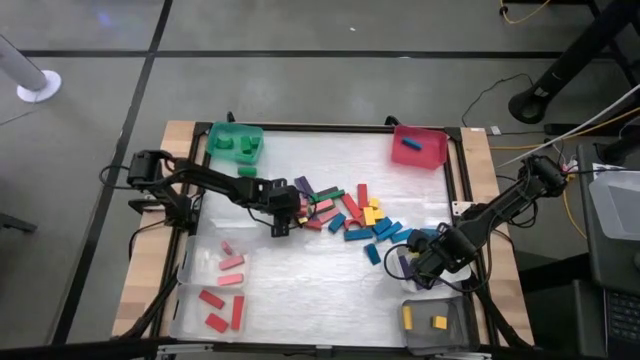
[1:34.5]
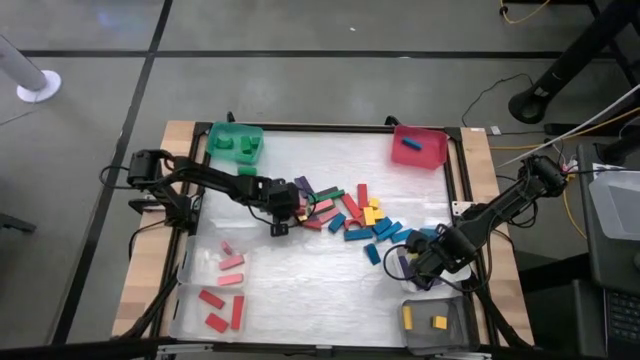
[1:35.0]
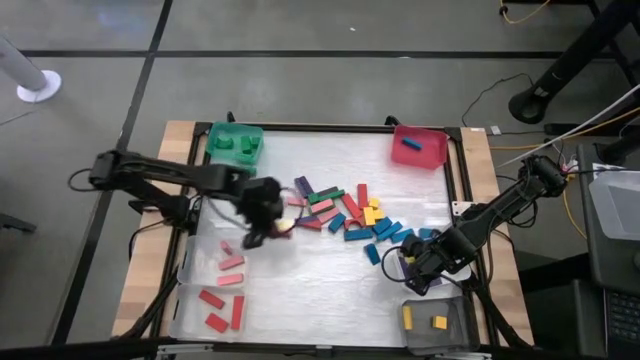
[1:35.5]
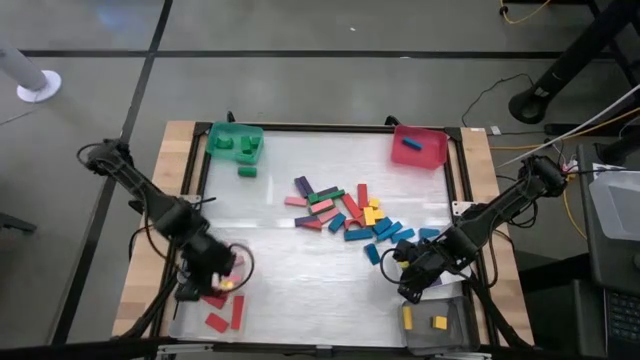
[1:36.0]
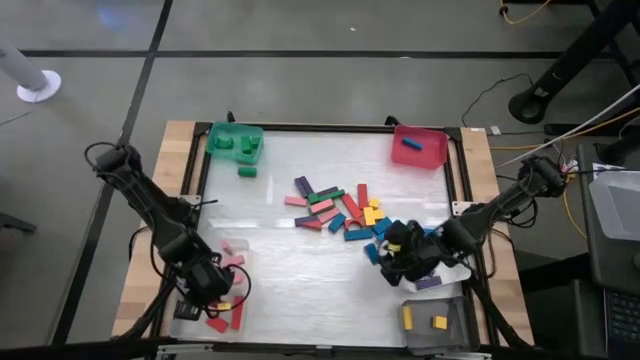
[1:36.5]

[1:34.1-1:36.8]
Task: Sort blocks
Put the red block into the bottom transparent bin

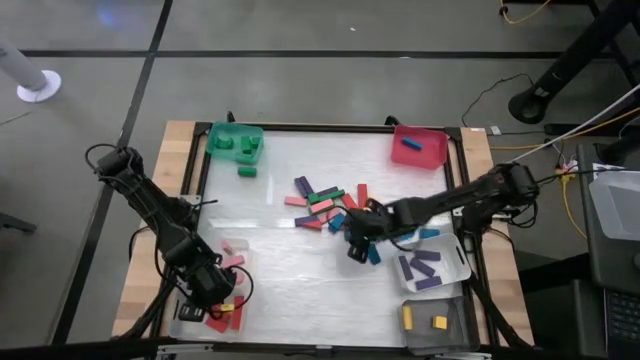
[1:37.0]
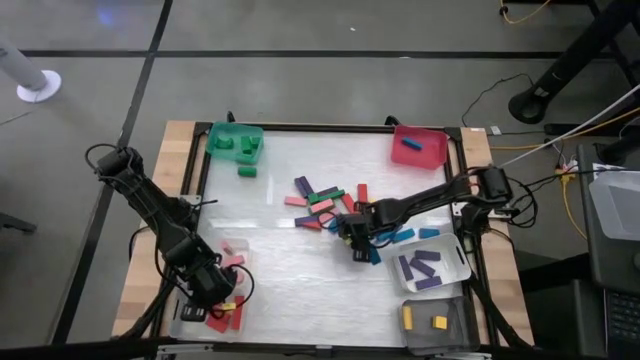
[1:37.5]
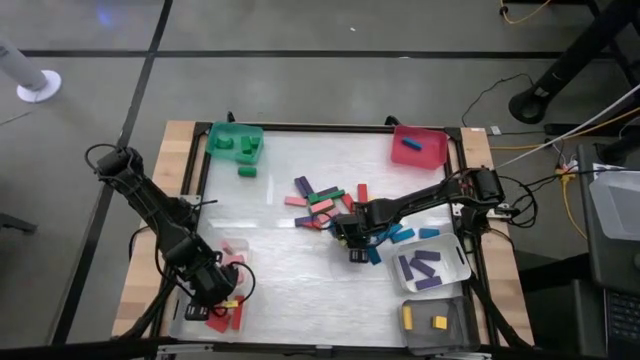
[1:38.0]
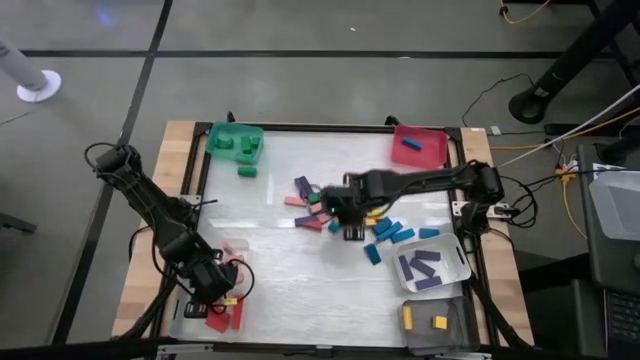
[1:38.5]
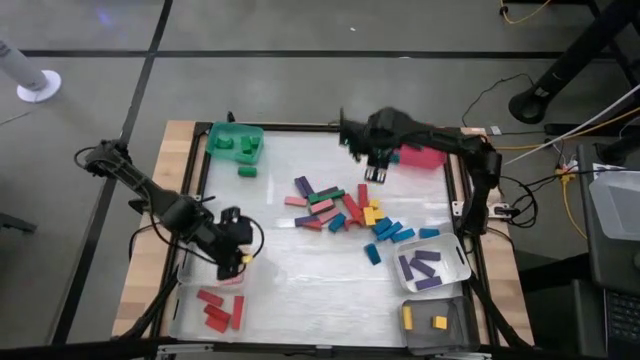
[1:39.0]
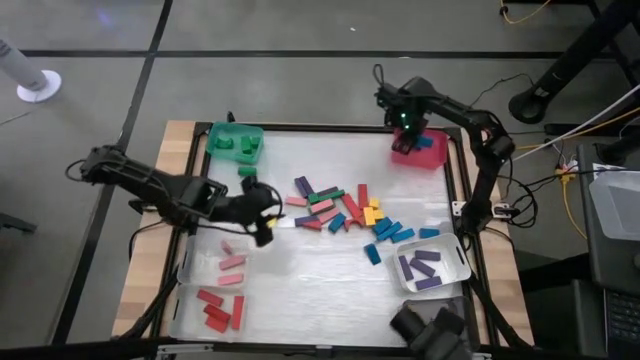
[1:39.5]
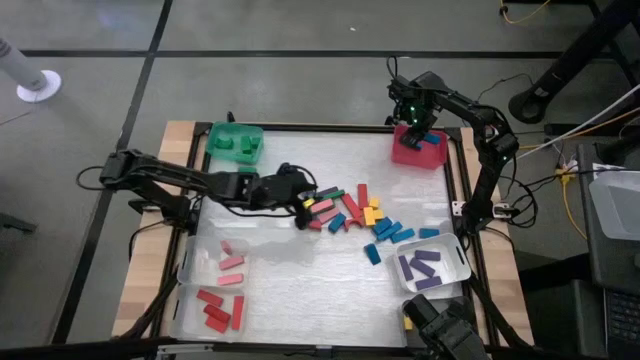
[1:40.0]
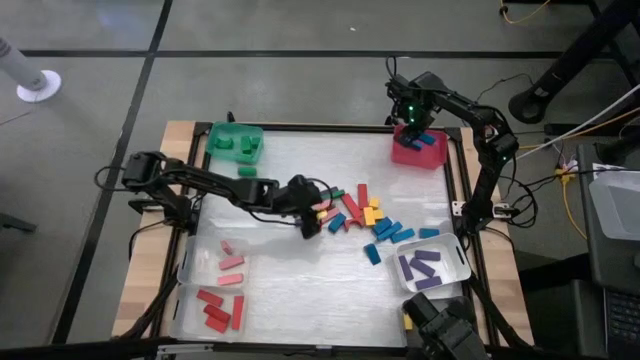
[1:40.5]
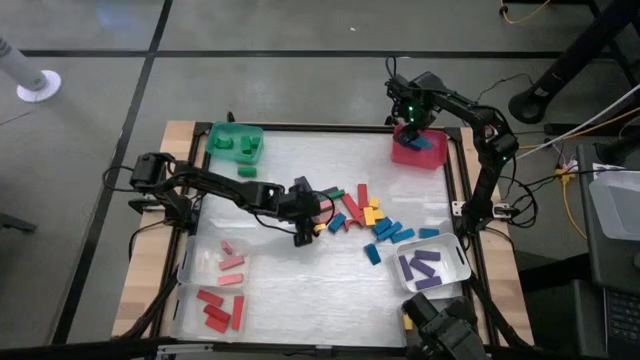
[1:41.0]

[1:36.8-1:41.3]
Put the blue block into the pink bin

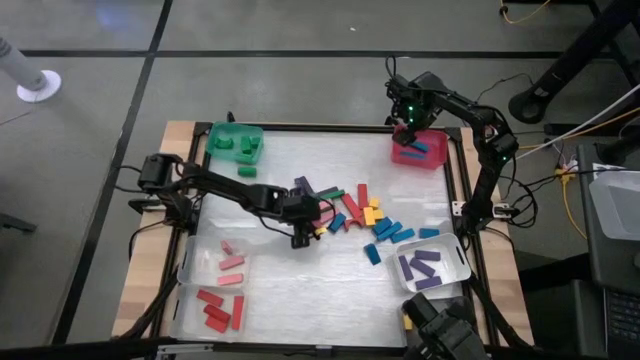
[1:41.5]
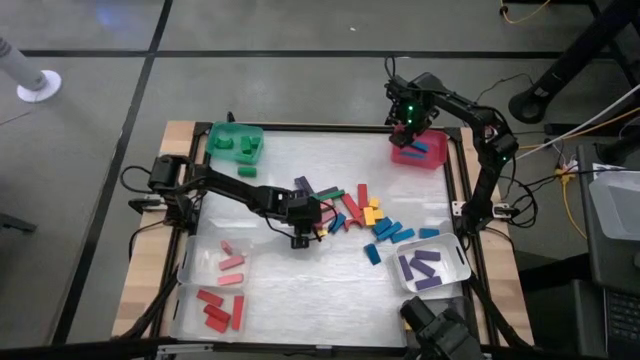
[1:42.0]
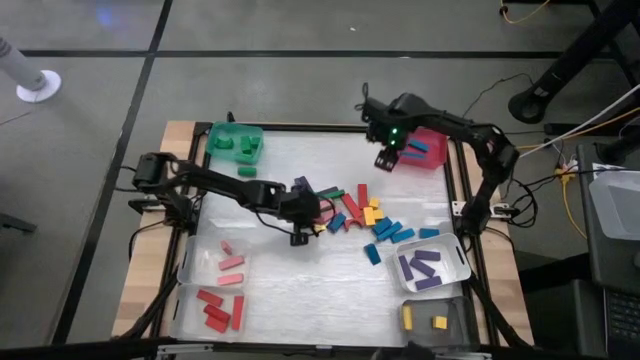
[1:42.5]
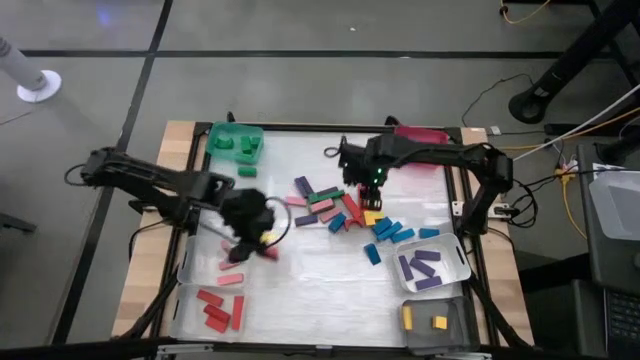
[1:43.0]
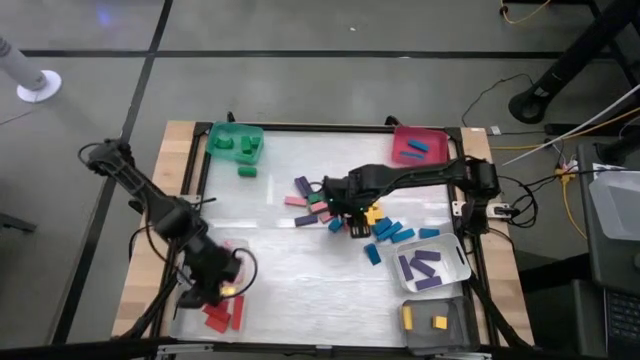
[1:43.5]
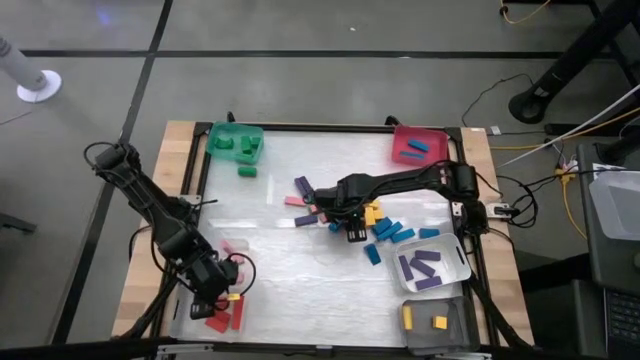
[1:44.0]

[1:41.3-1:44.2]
Put the red block into the bottom transparent bin

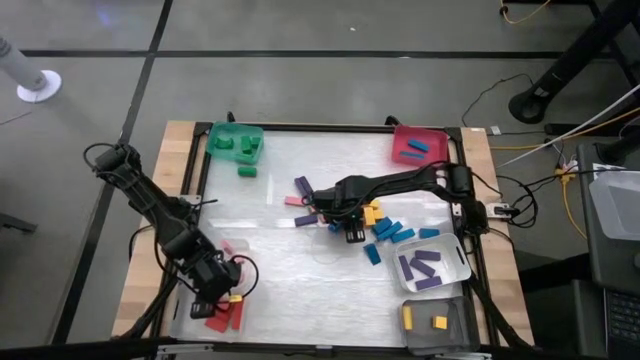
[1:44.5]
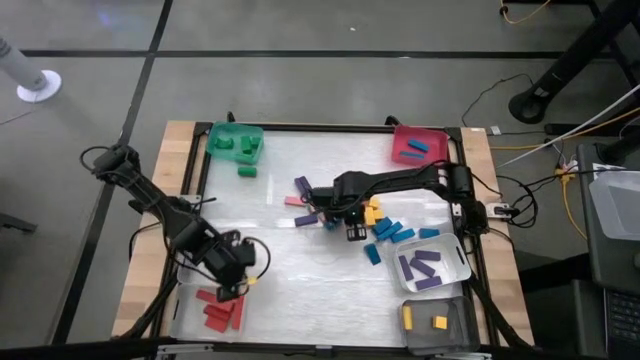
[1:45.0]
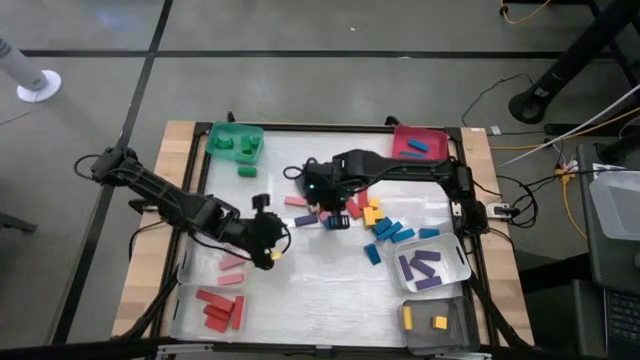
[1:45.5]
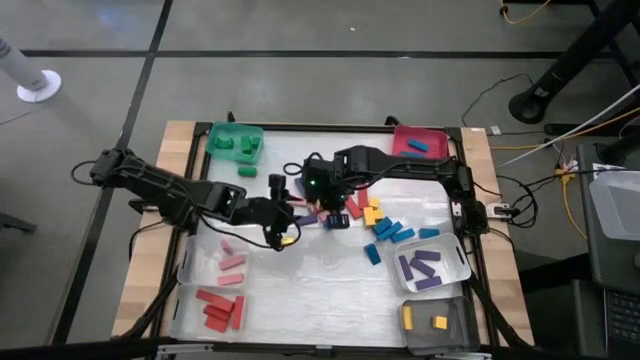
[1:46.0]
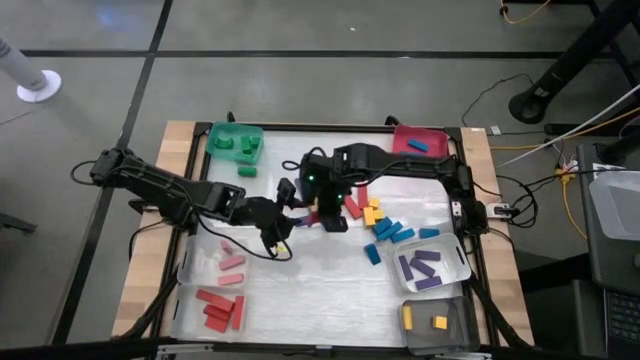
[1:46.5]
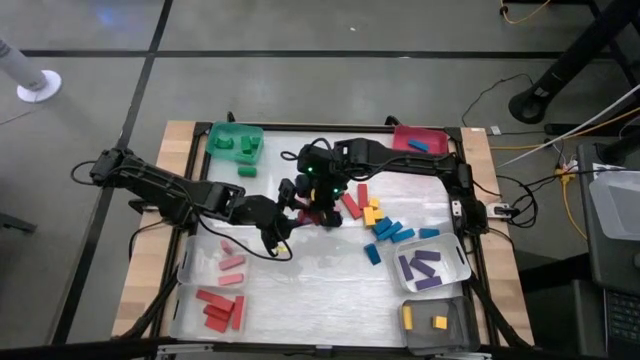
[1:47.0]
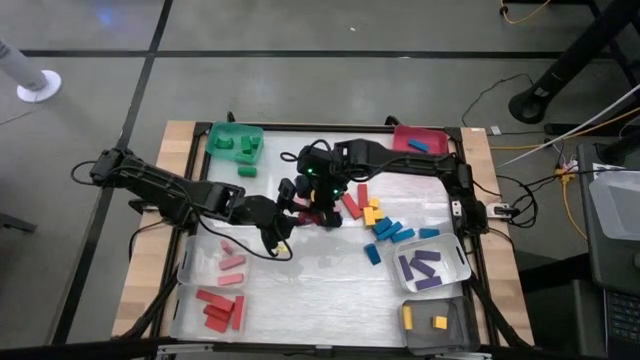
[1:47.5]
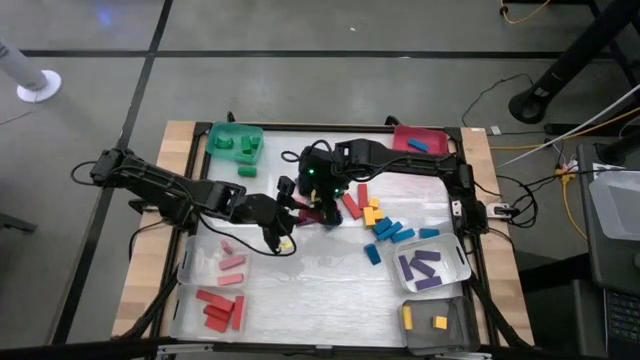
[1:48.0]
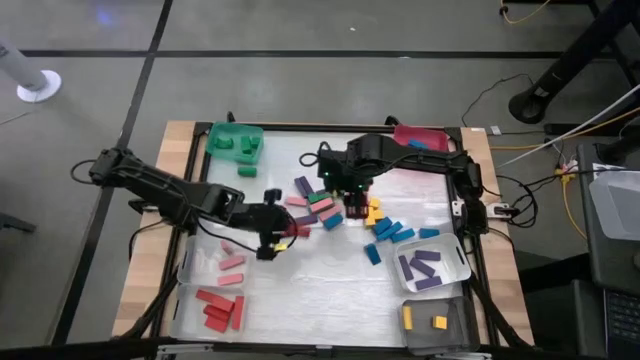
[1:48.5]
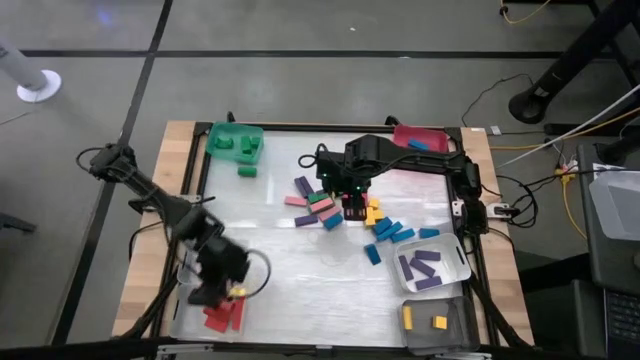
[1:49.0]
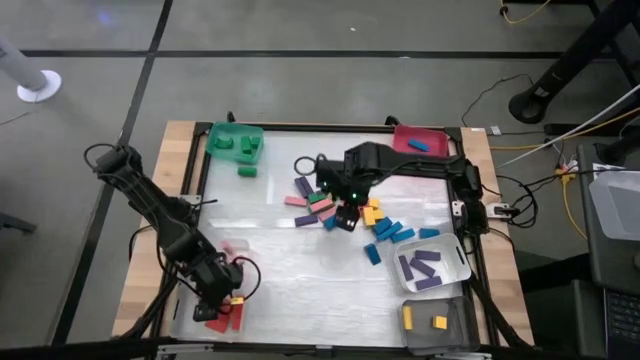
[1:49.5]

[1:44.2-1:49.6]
Put the red block into the bottom transparent bin

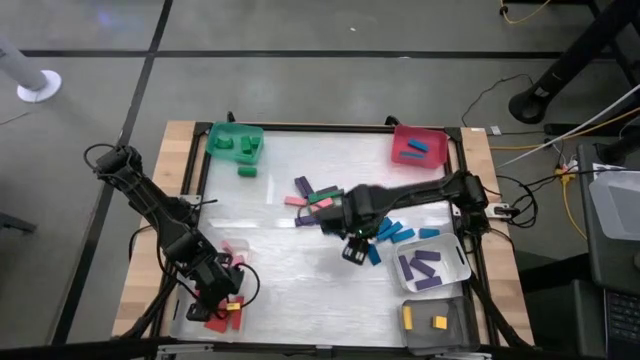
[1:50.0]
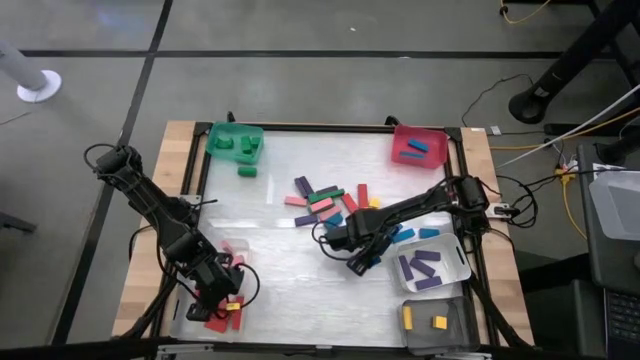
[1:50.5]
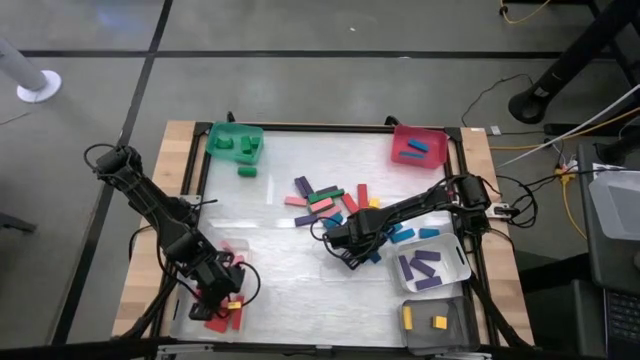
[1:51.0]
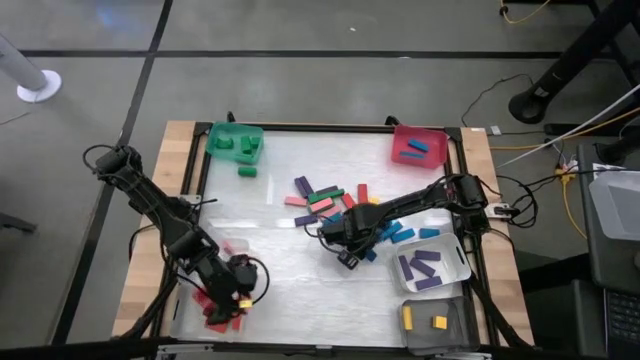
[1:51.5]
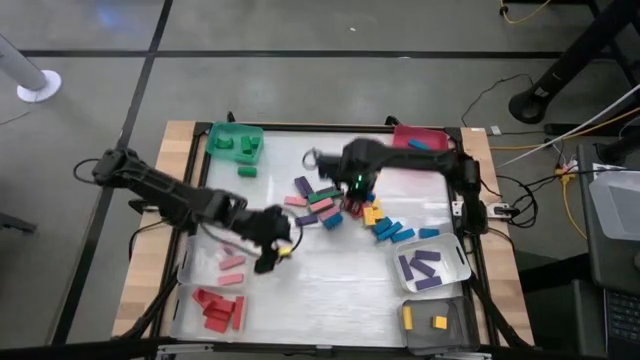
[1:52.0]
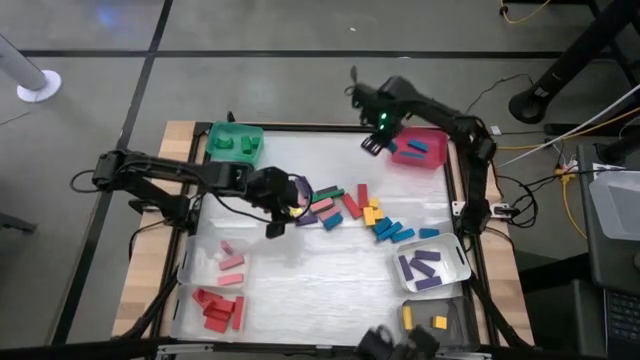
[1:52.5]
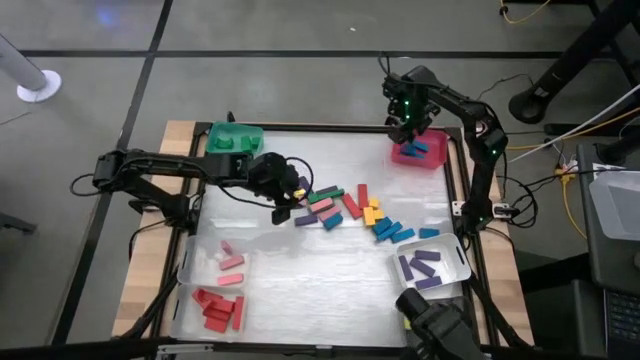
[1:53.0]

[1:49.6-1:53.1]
Put the blue block into the pink bin

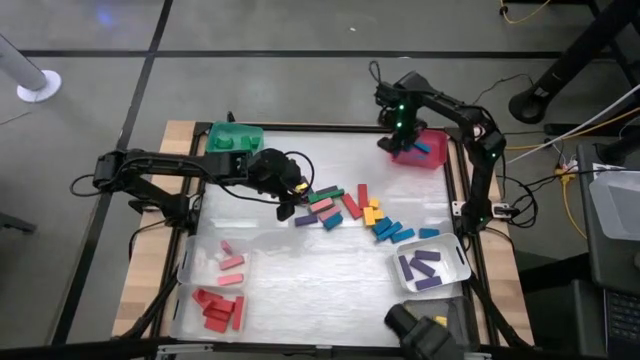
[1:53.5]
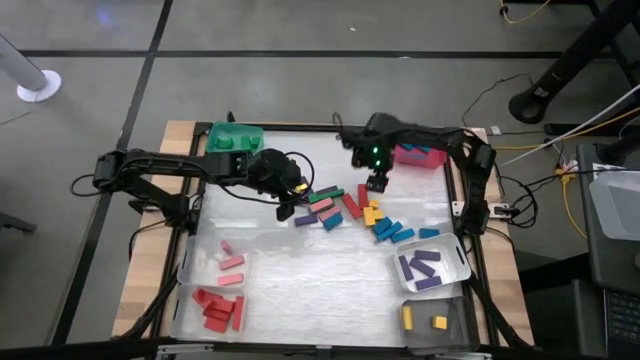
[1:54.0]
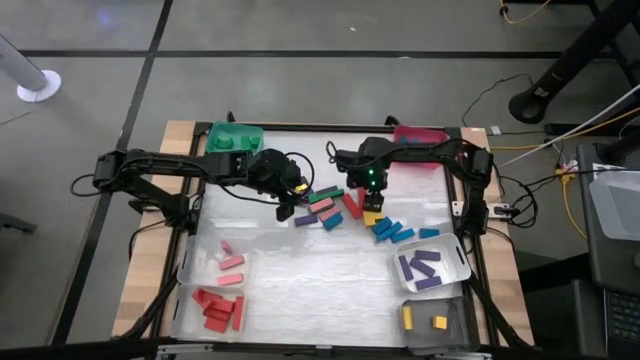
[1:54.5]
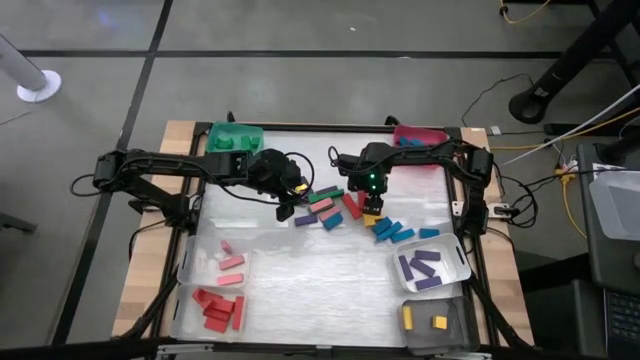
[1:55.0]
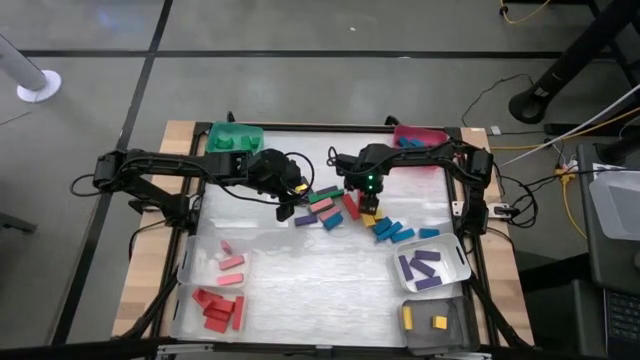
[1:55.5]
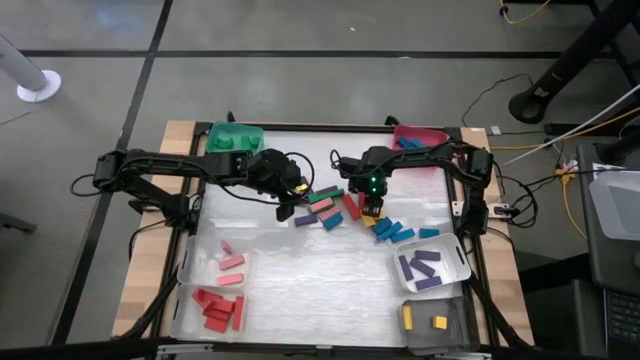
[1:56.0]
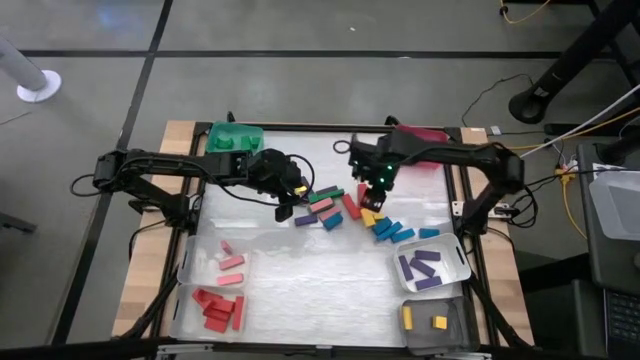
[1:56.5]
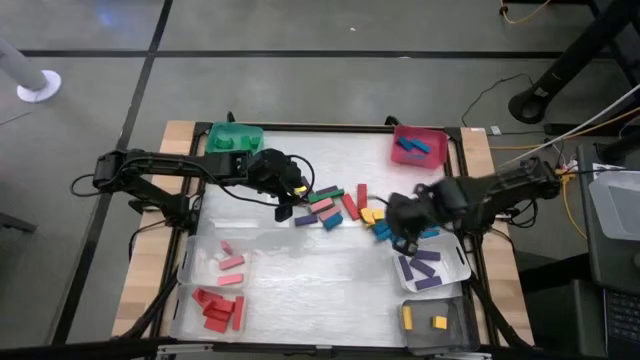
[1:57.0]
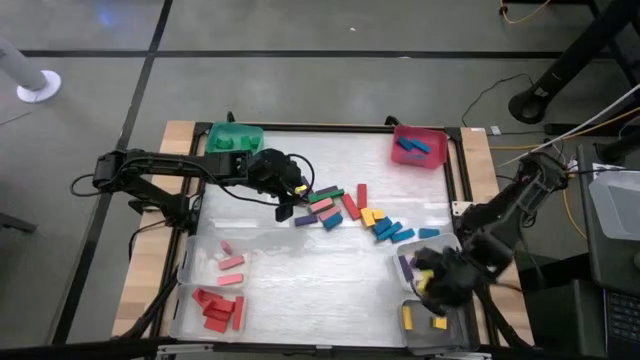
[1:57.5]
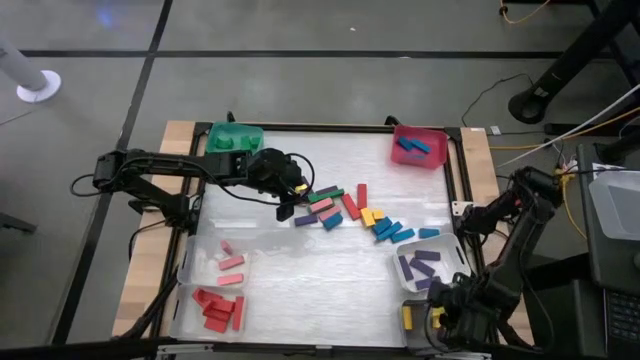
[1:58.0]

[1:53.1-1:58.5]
Put the yellow block into the black bin
